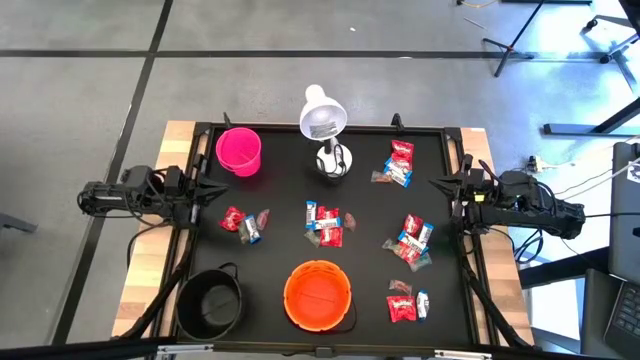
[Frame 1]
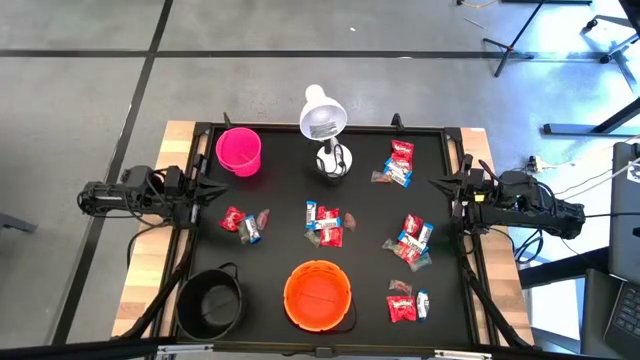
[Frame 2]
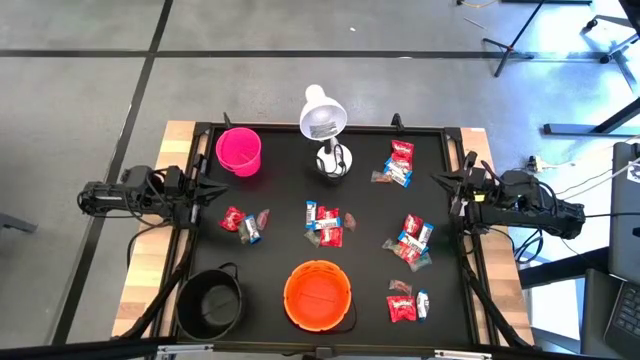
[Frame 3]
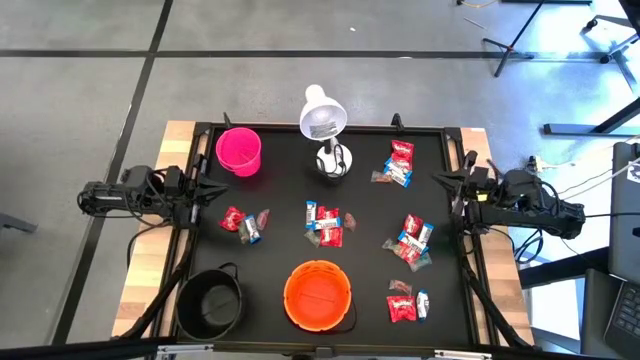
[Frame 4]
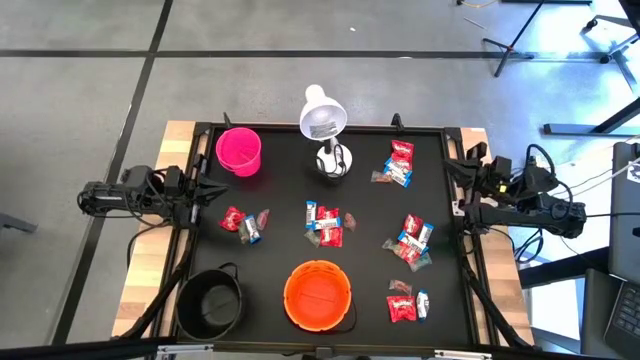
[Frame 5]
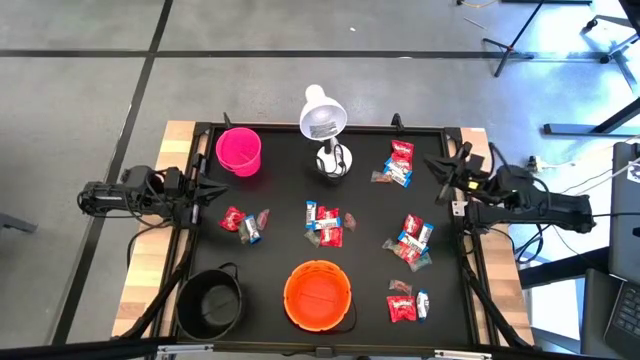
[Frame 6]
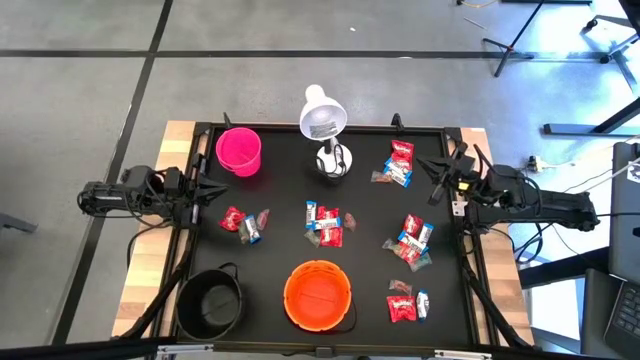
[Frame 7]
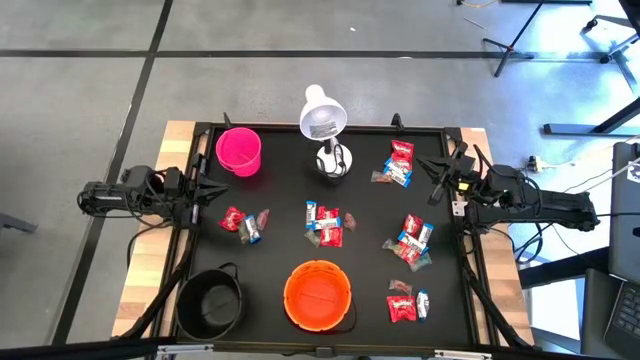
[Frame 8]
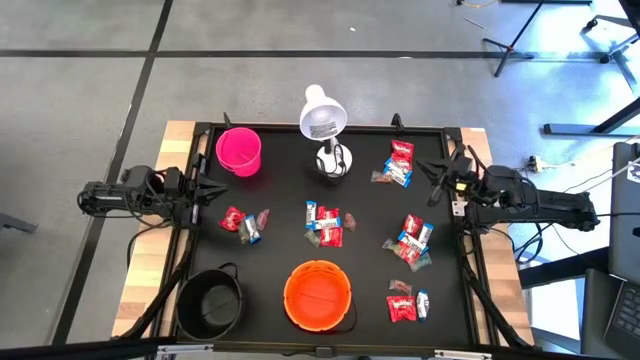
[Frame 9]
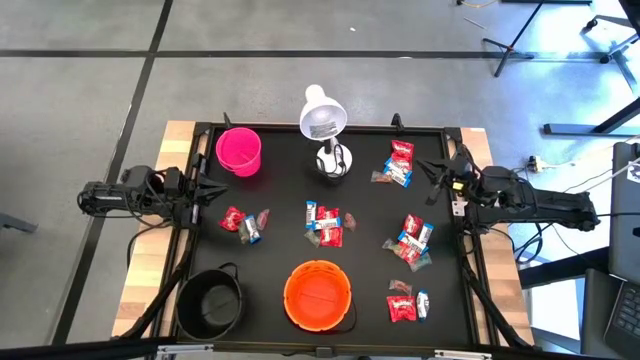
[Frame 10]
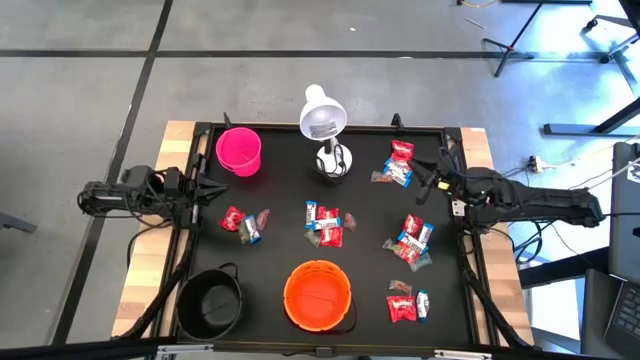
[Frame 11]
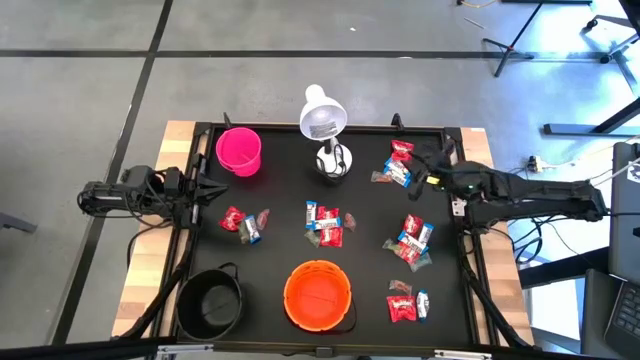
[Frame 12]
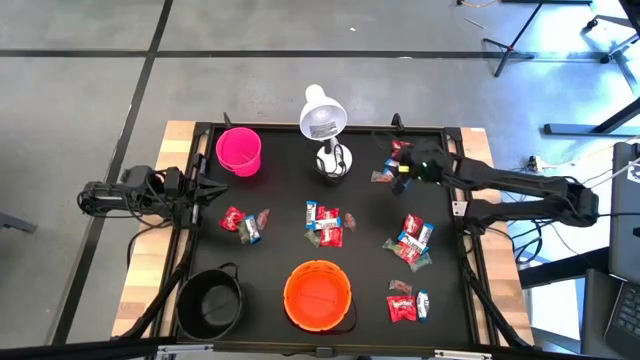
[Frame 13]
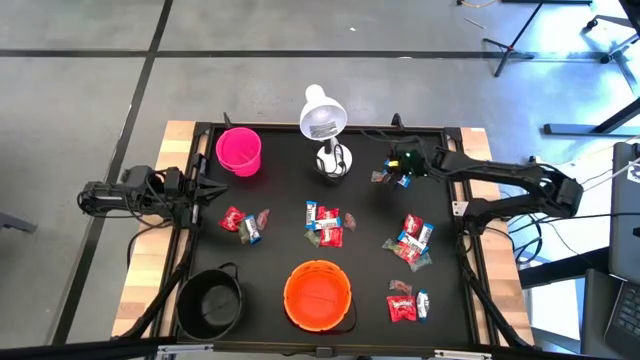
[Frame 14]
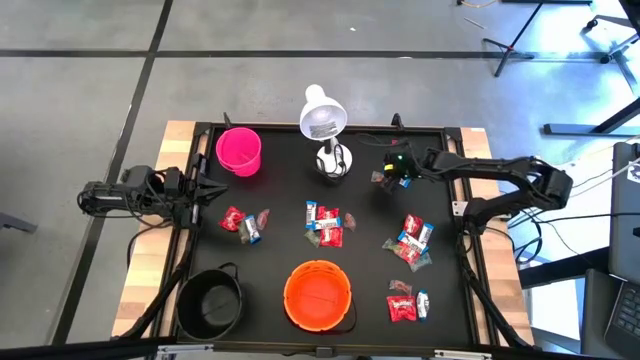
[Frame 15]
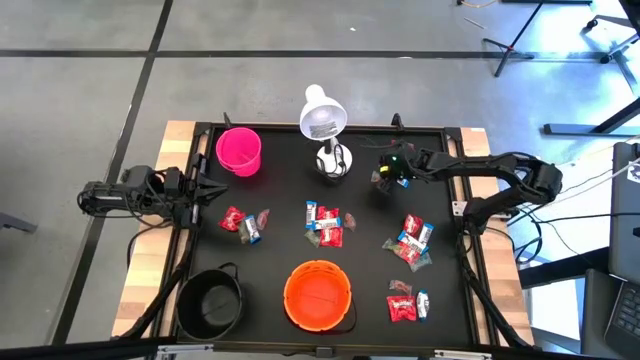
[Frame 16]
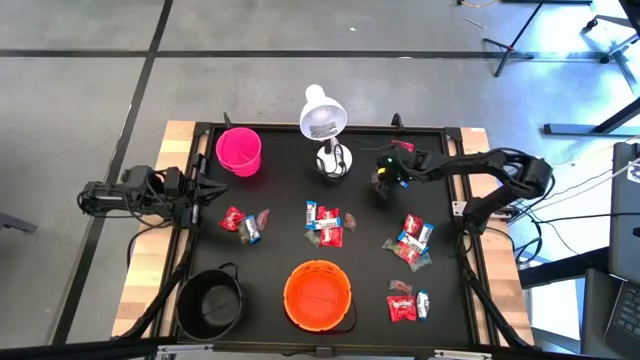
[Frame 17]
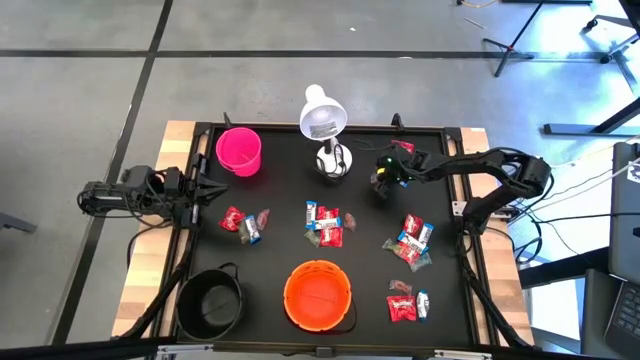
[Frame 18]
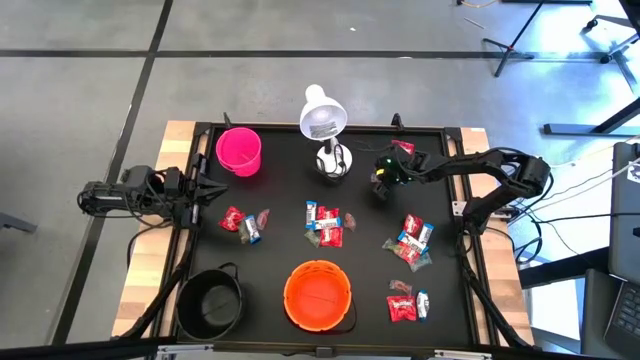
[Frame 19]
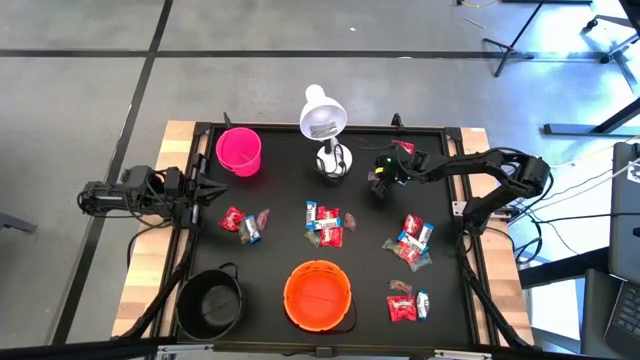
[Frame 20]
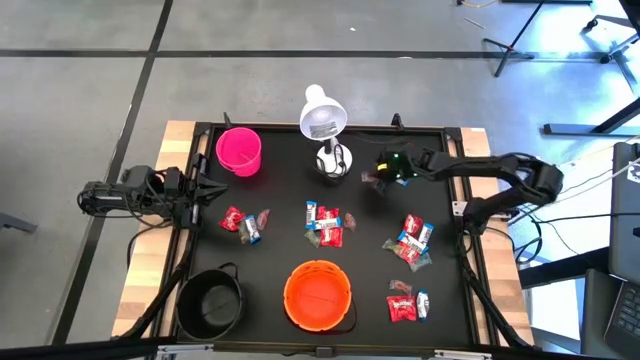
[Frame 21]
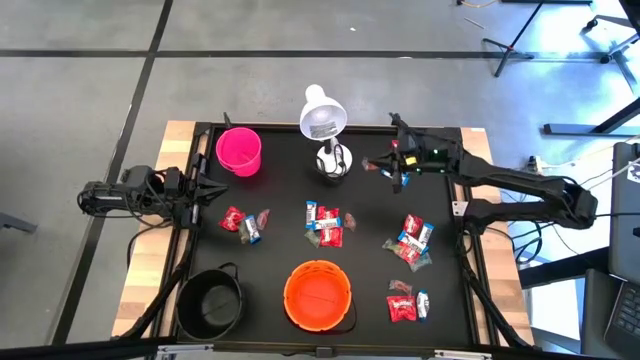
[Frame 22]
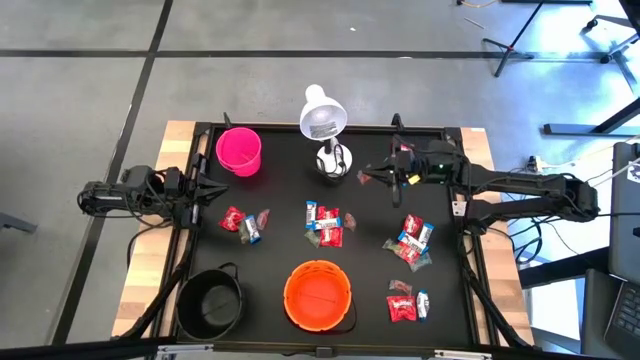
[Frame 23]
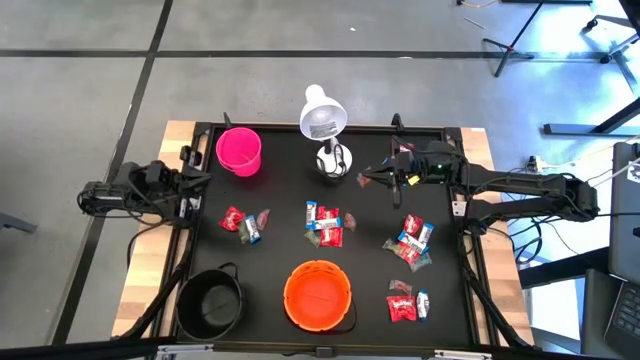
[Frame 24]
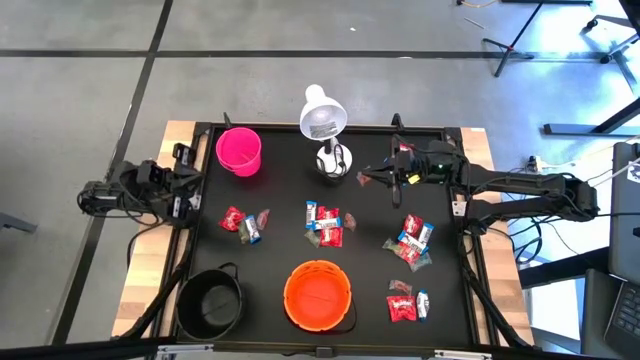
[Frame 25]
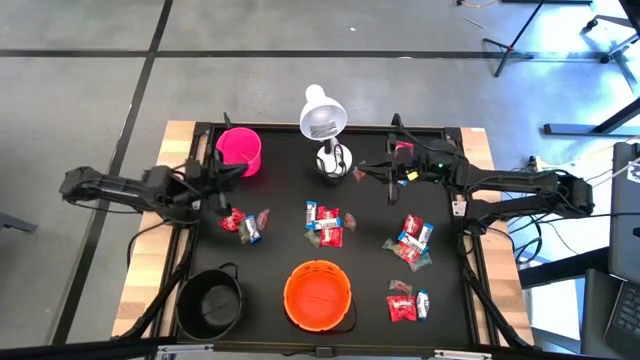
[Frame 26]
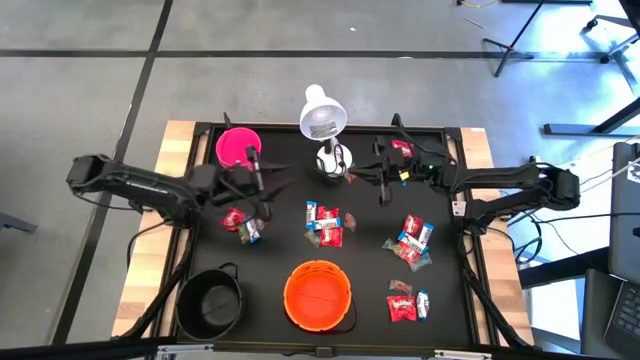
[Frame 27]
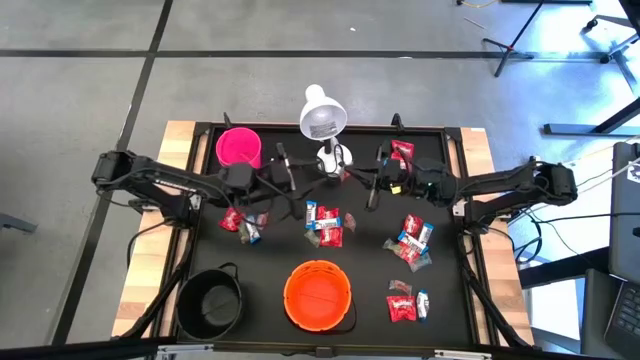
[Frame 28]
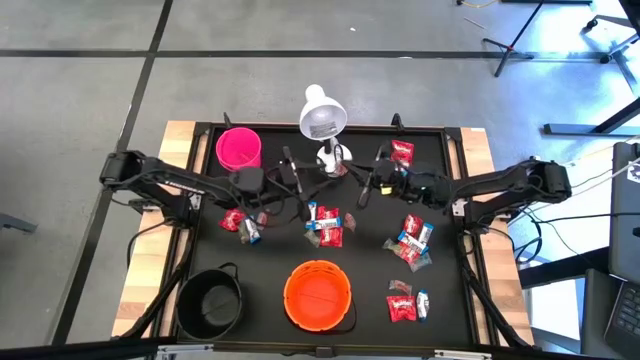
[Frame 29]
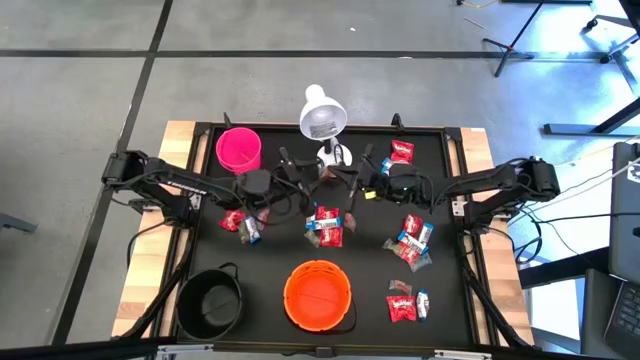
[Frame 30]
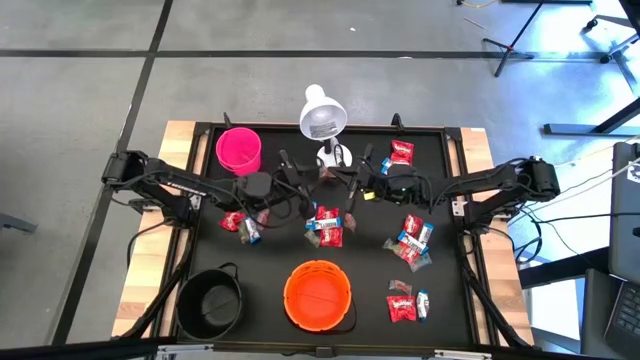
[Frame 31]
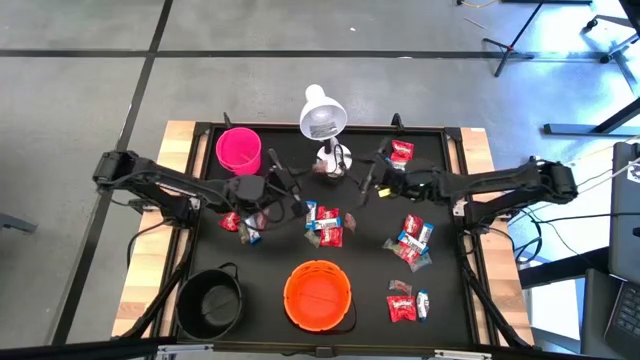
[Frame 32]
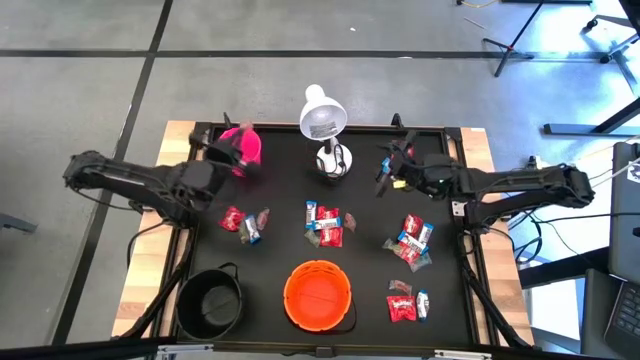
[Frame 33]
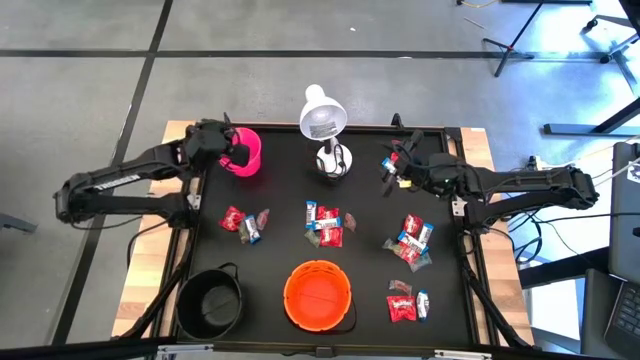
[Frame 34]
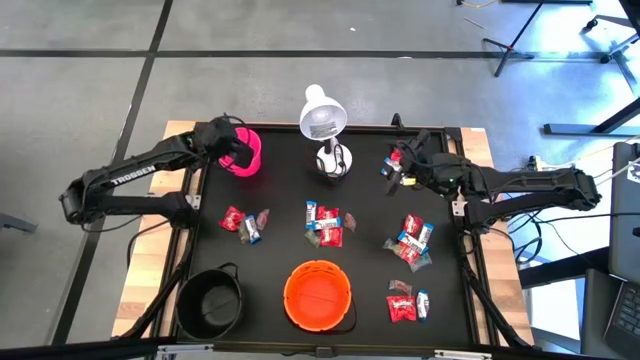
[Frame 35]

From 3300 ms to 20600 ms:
Task: Sort candy
Put the orange candy into the pink bucket

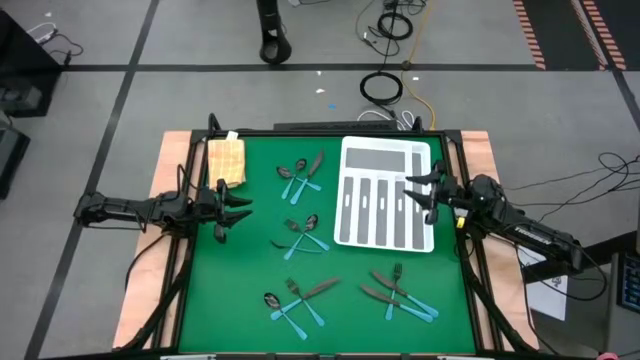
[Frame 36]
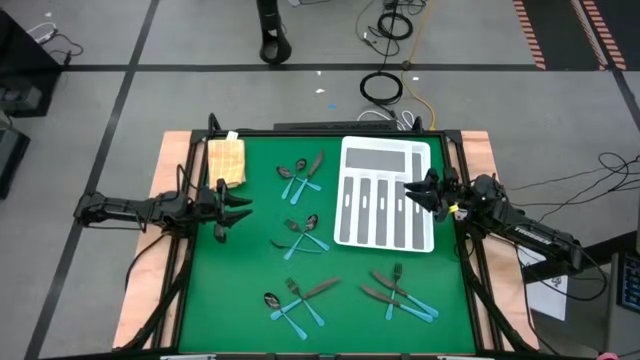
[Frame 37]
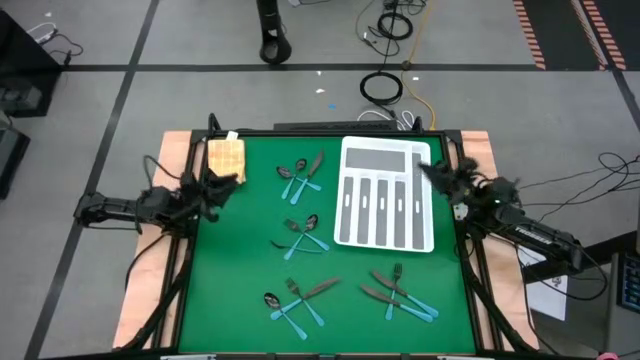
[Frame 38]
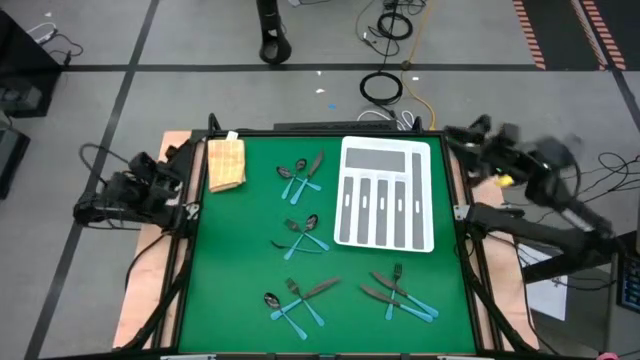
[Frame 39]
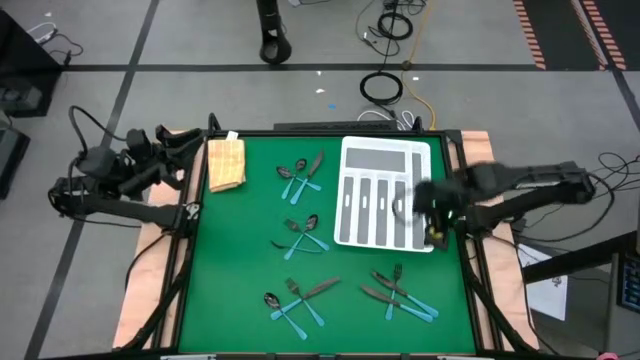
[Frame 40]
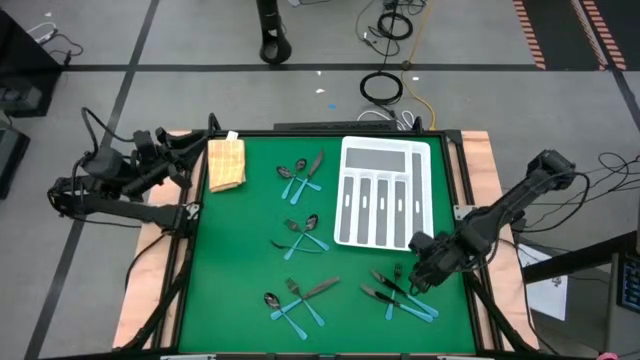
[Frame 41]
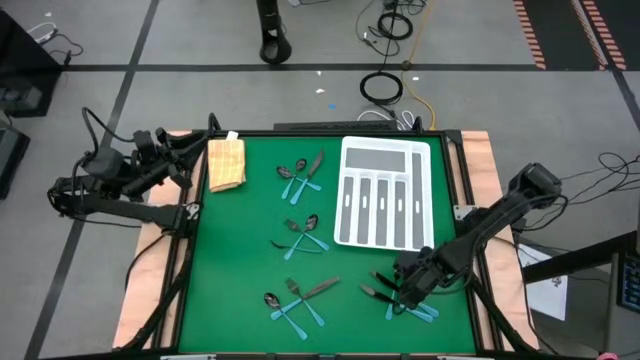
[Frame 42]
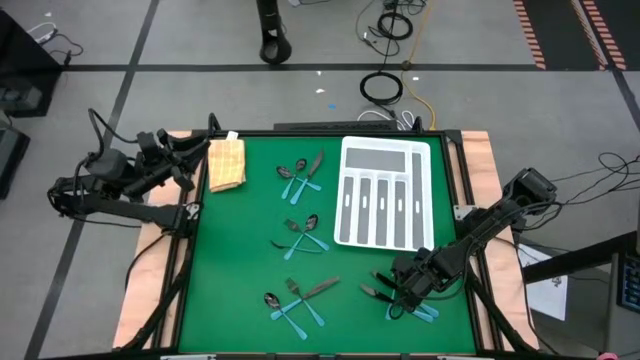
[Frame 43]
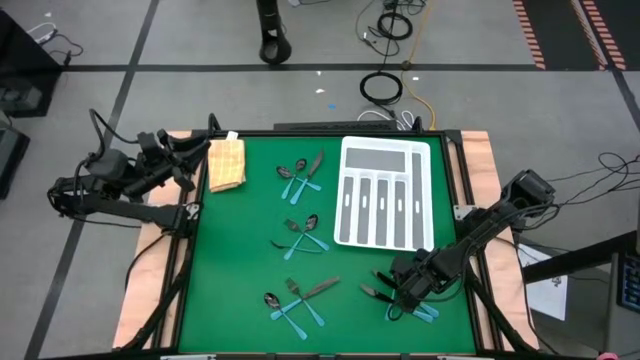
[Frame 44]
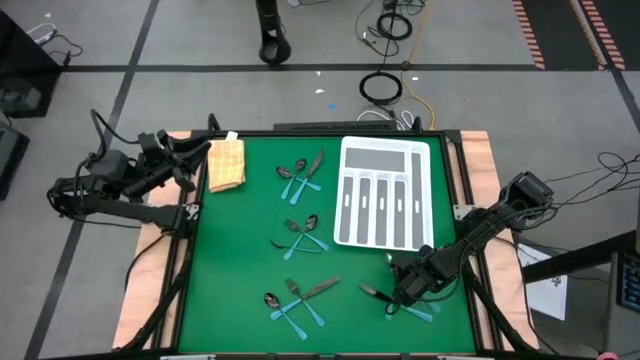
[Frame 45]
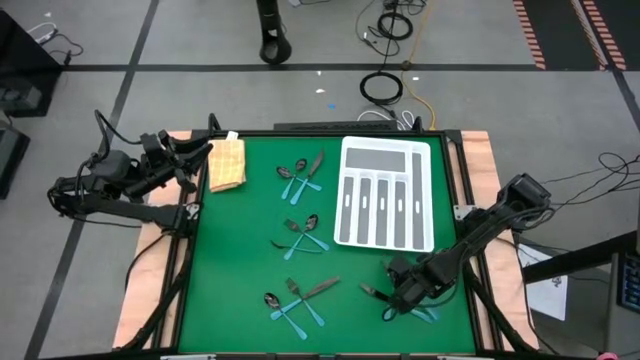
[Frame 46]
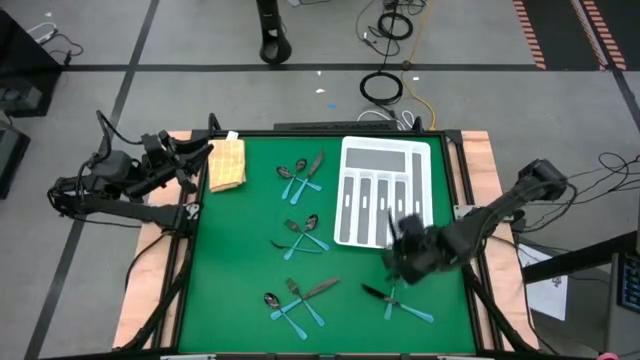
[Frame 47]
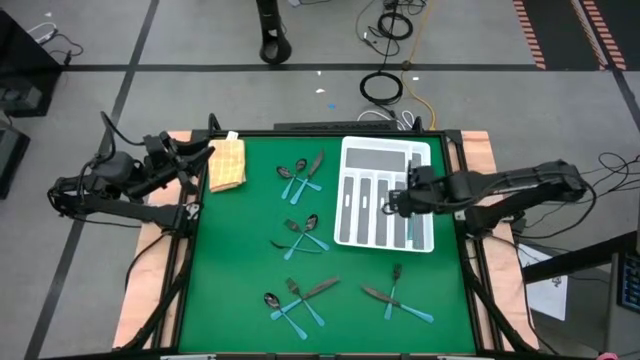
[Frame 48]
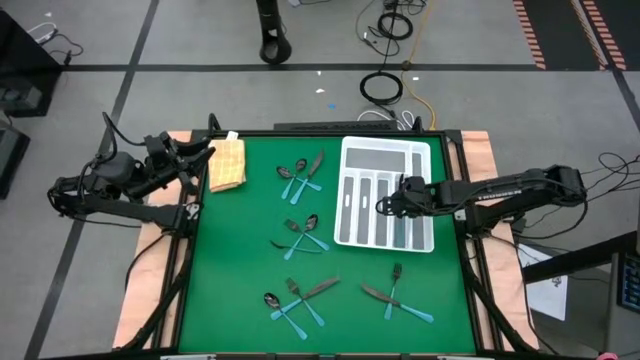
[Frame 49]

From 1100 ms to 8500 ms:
Task: Sort silverware
Put the blue table knife into the silverware tray
